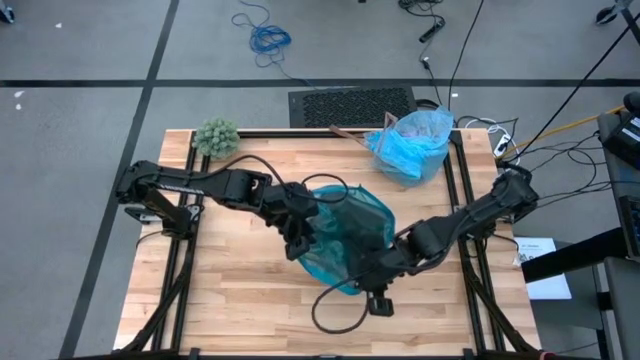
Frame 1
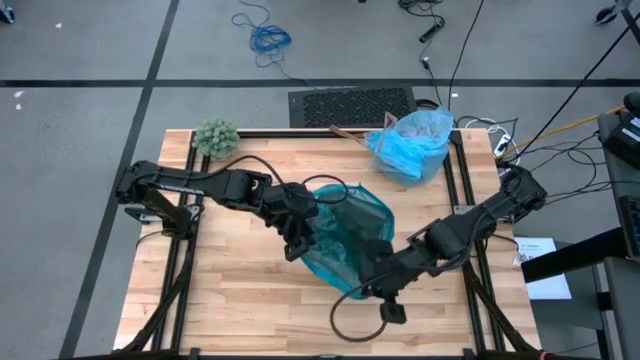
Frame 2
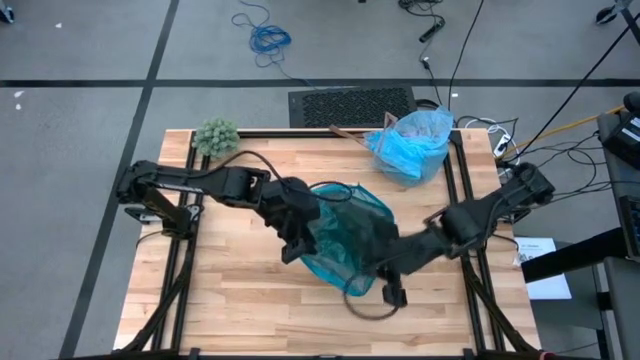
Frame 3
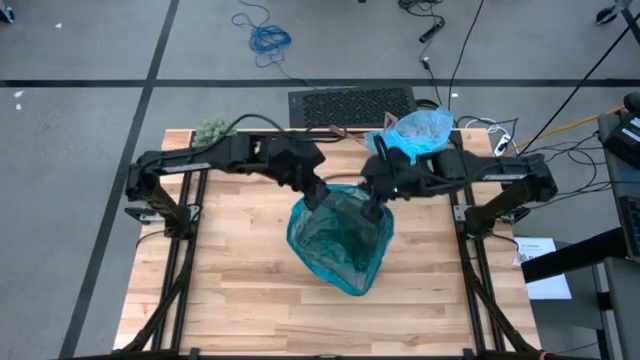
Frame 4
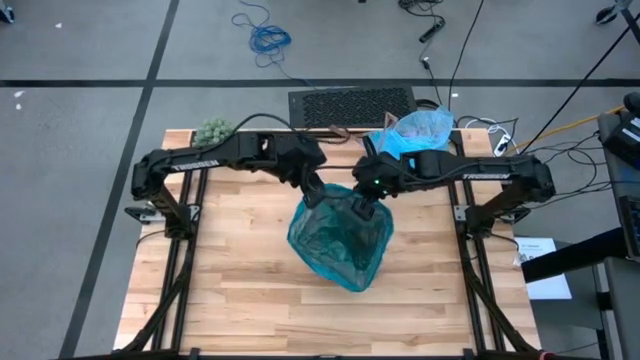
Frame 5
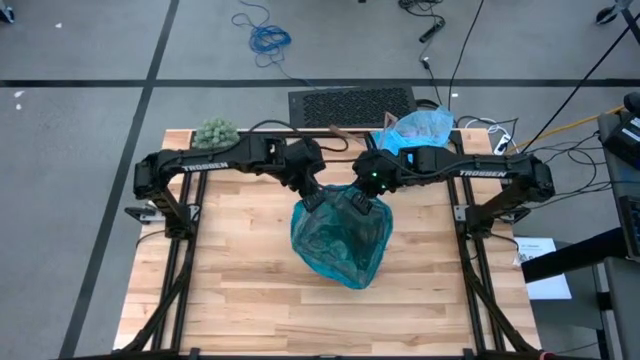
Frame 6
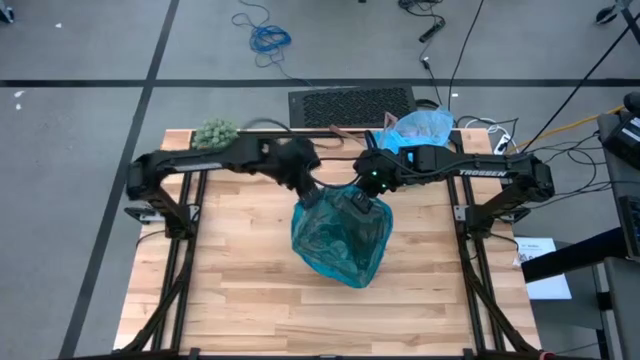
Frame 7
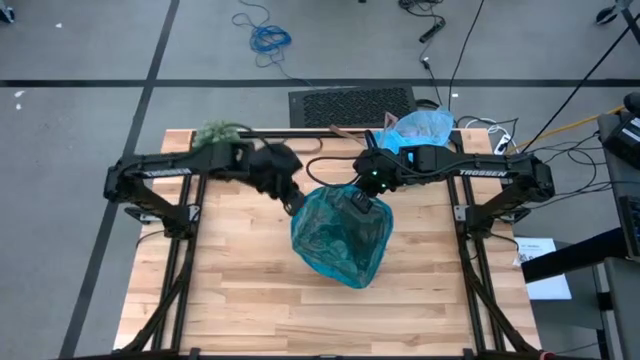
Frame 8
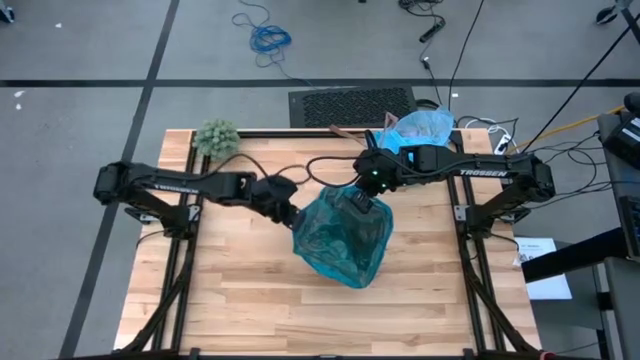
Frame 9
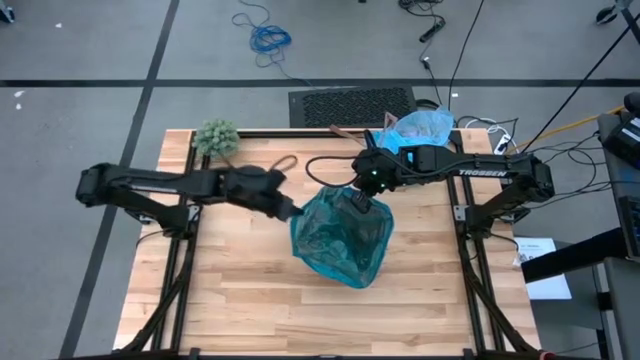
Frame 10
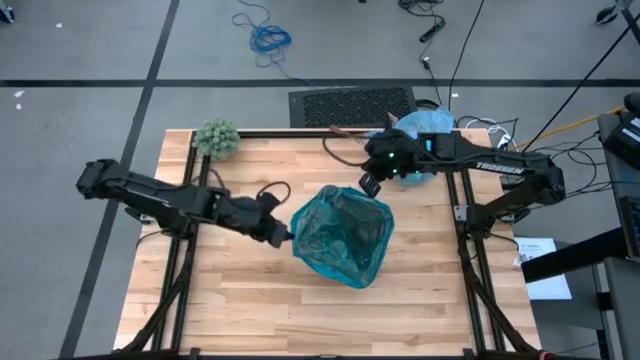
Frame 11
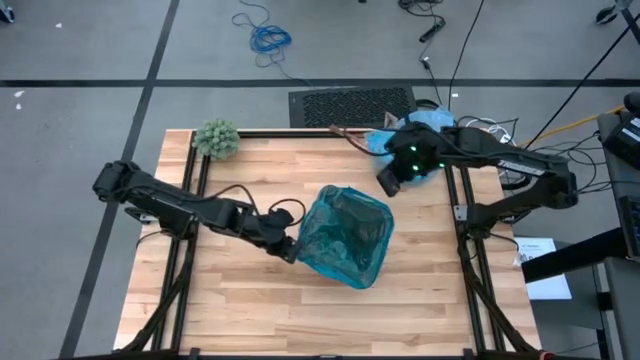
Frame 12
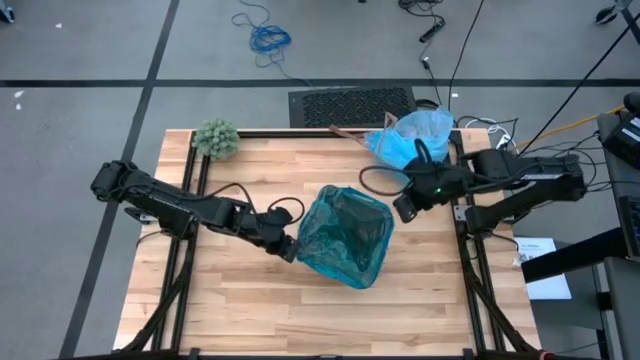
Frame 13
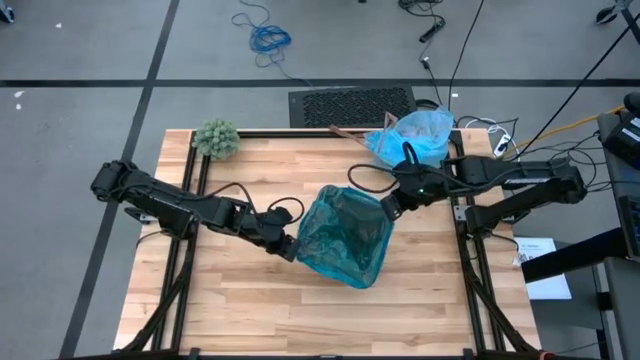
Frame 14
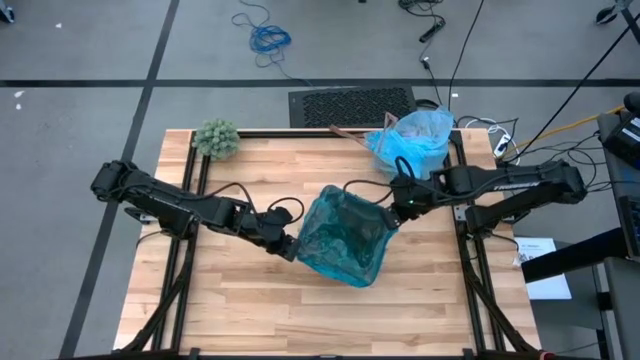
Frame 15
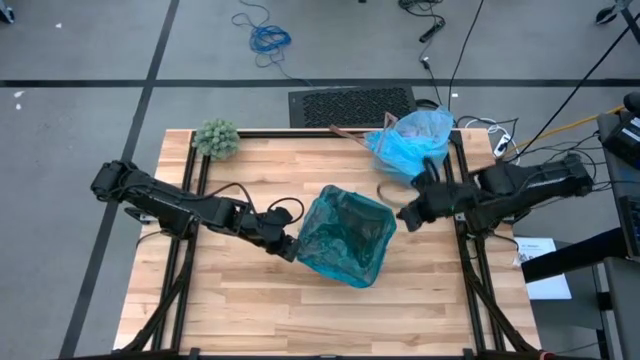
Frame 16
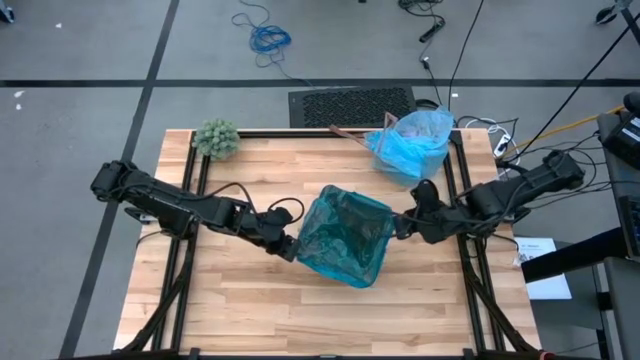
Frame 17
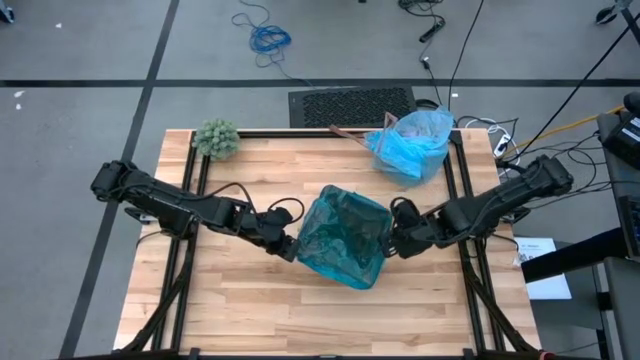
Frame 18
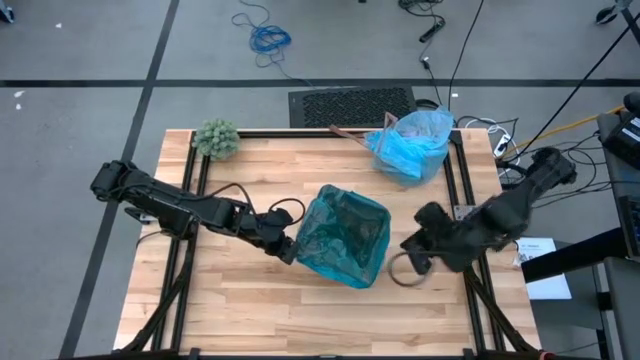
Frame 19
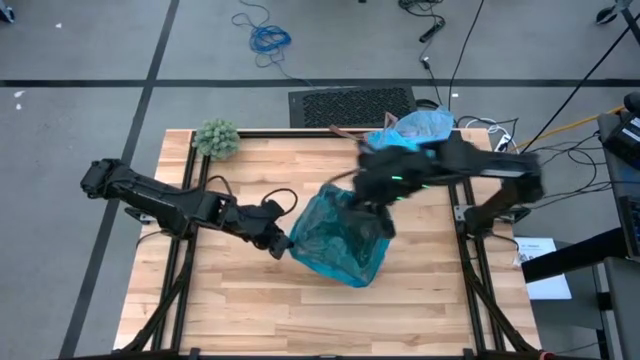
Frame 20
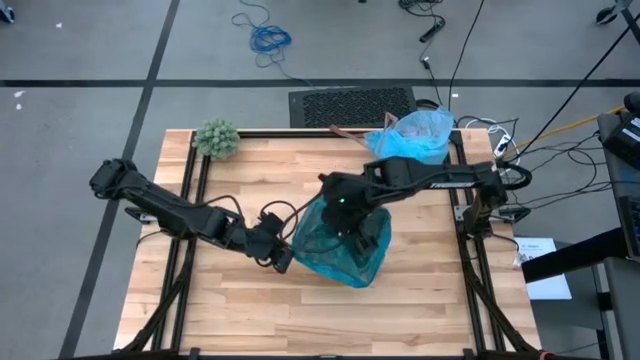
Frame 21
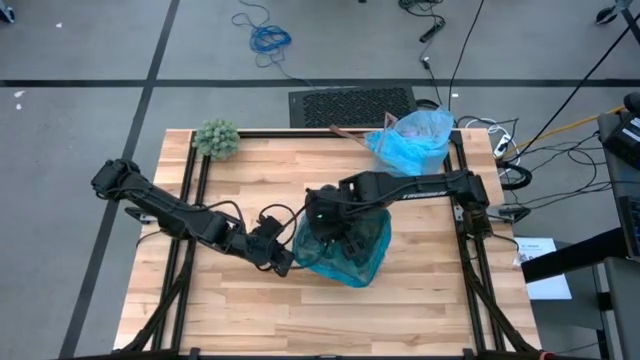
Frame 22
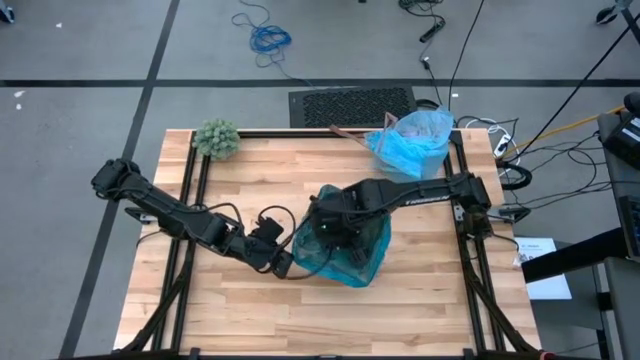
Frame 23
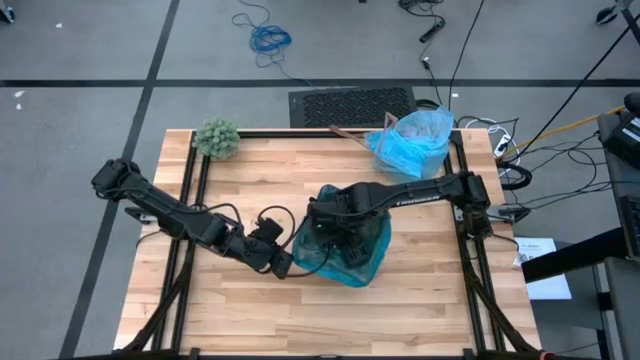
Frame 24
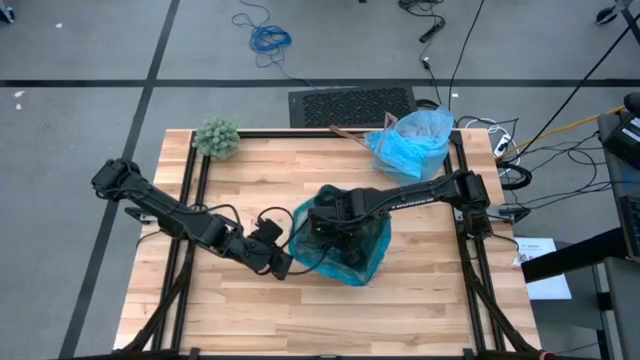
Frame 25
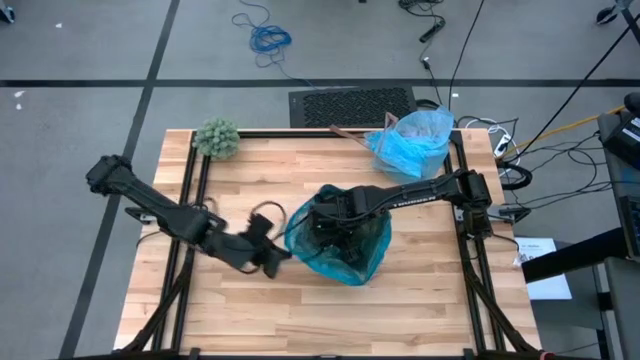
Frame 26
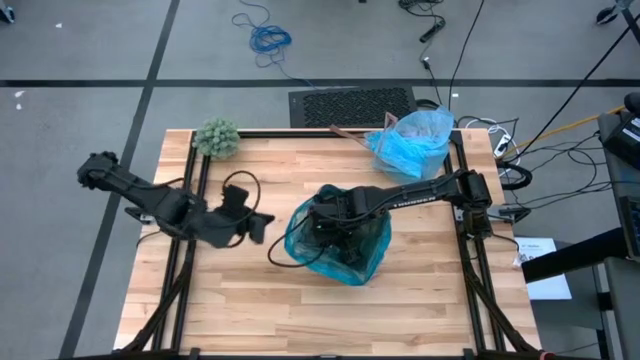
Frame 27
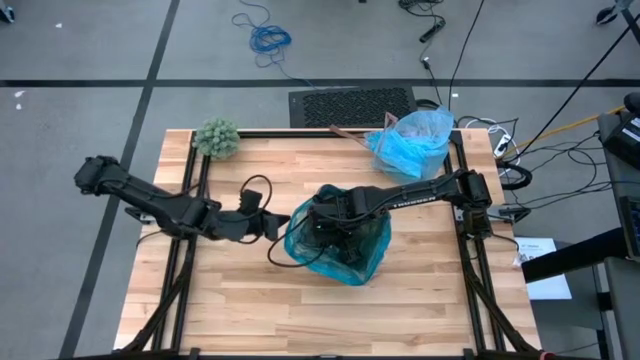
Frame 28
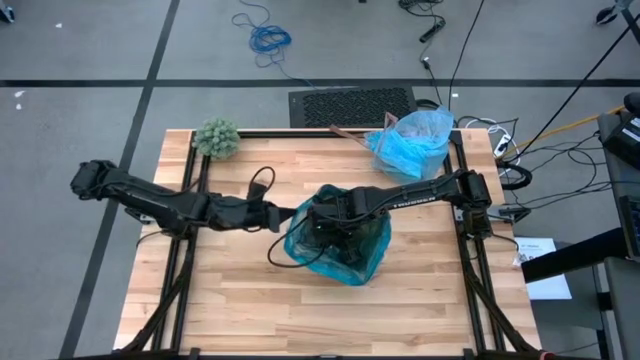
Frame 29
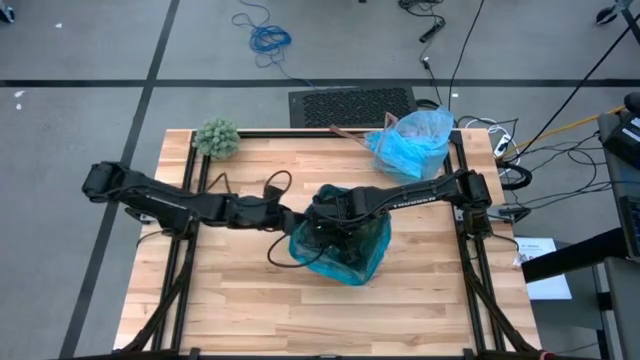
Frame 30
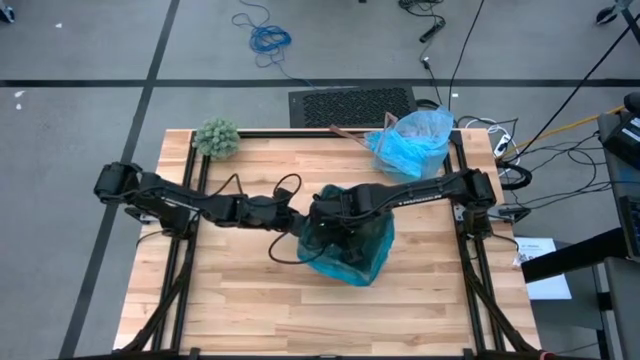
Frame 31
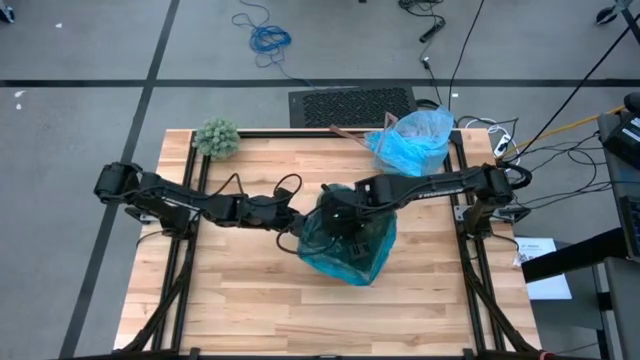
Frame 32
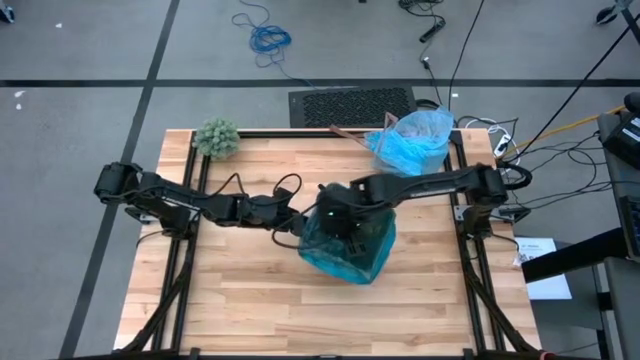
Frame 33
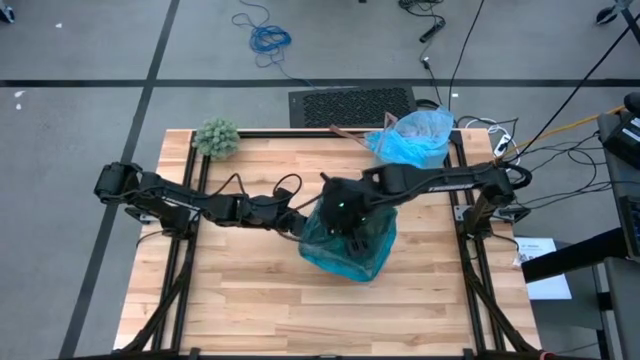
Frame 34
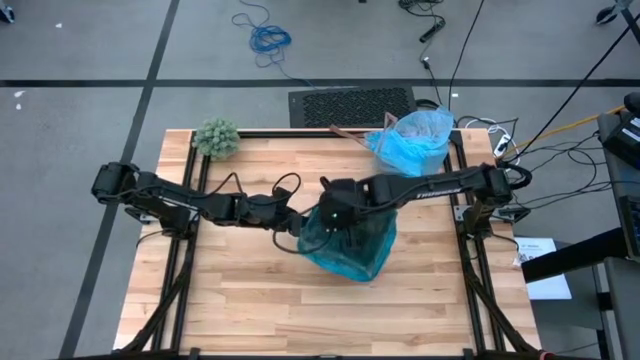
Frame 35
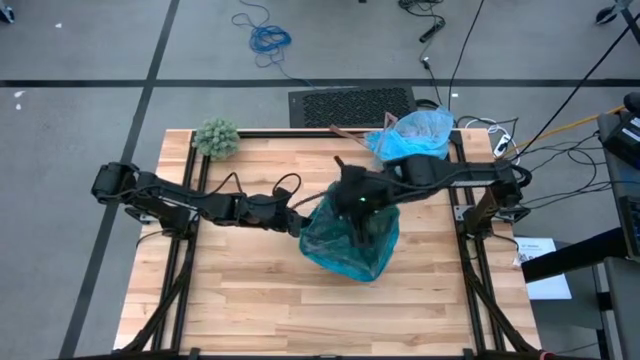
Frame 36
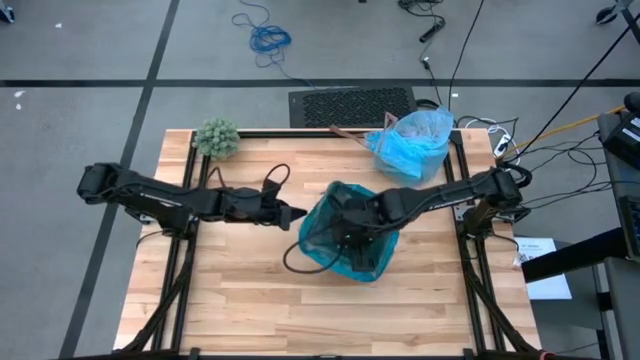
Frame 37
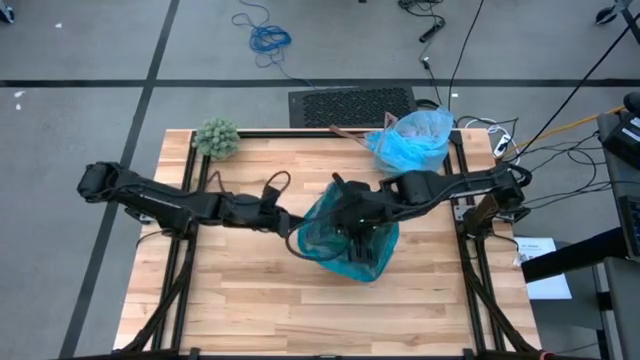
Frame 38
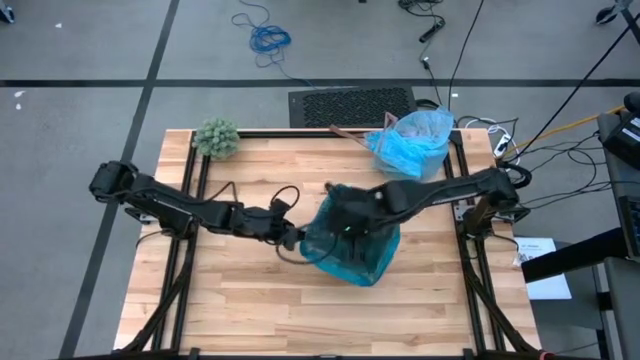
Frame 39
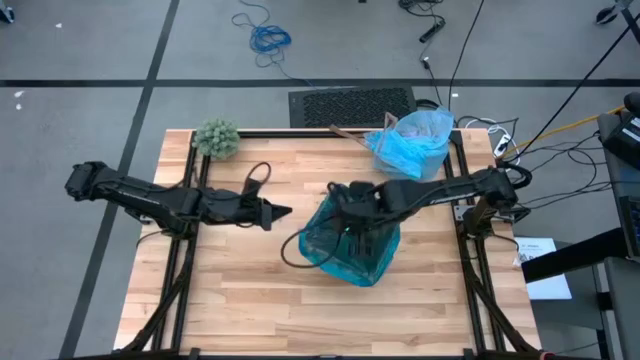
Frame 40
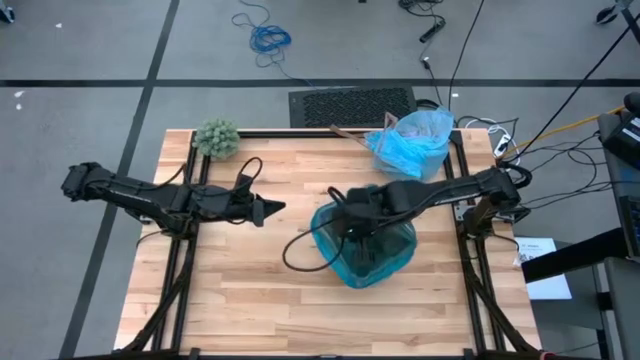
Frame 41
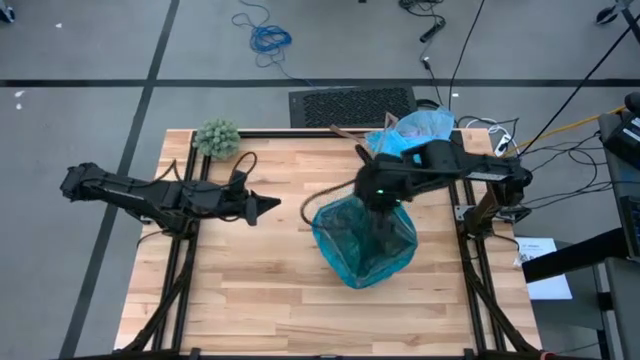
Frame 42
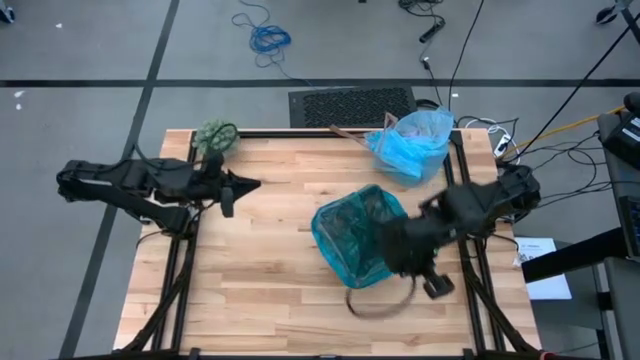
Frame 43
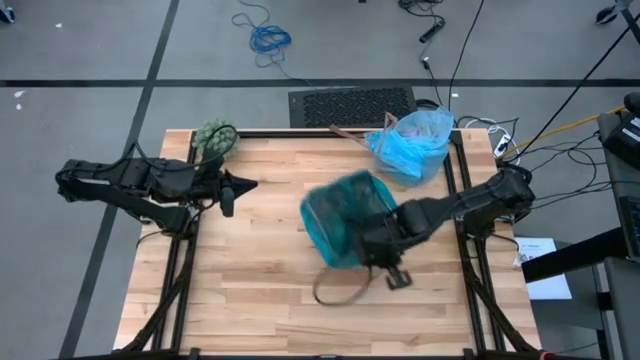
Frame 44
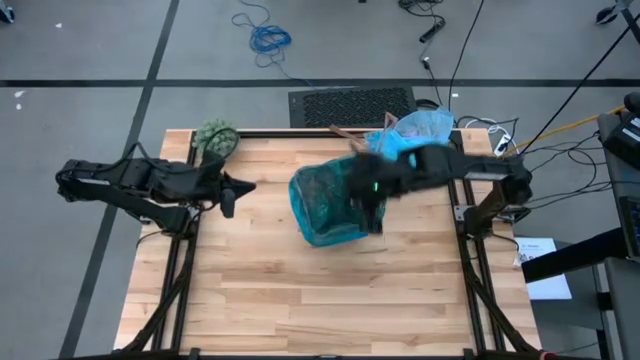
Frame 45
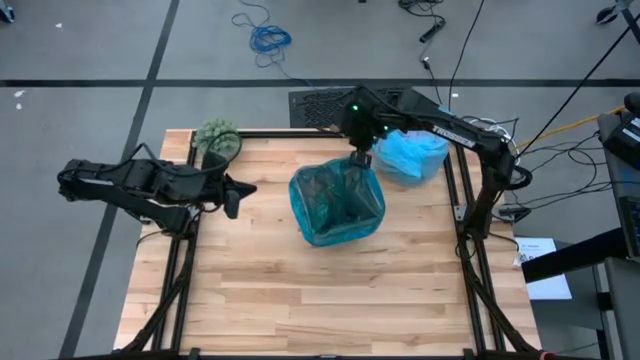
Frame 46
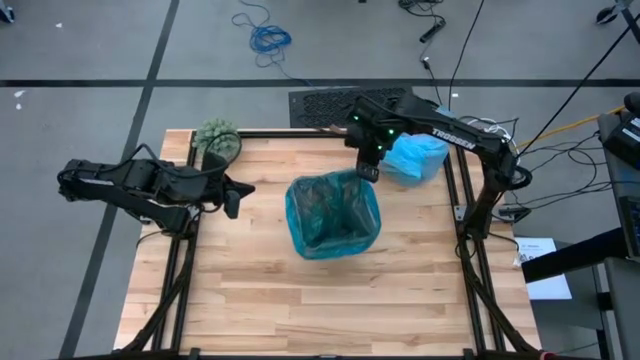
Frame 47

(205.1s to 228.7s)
Task: place trash/remove bag and relplace
Insert the bottom blue trash bag into the trash bin
